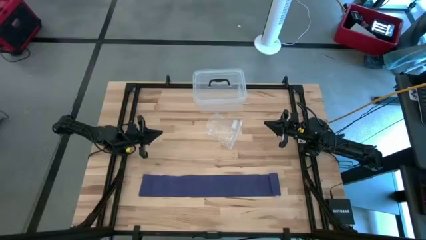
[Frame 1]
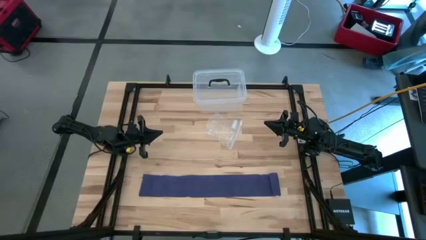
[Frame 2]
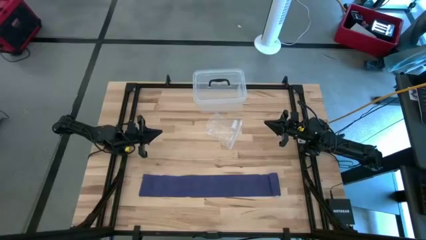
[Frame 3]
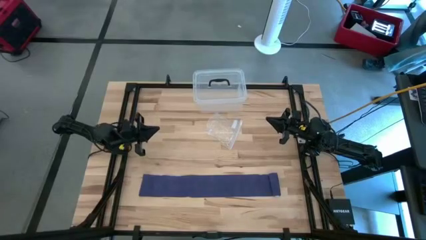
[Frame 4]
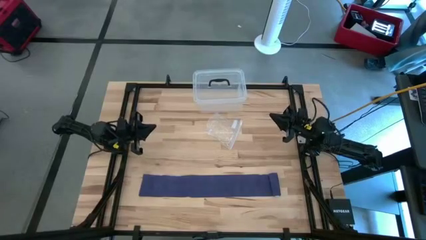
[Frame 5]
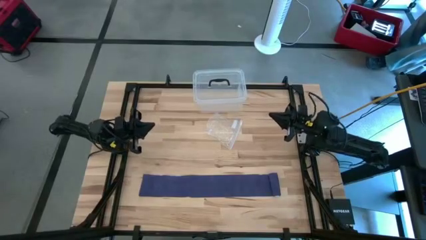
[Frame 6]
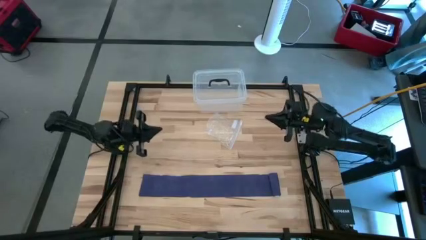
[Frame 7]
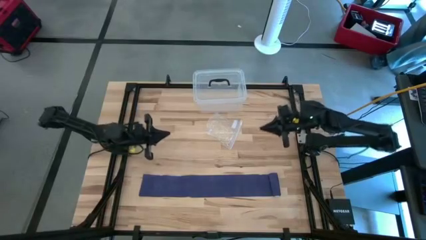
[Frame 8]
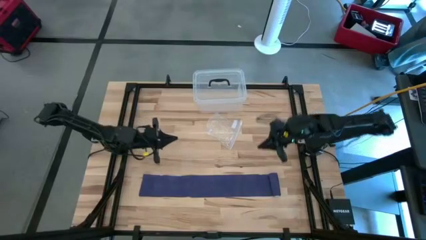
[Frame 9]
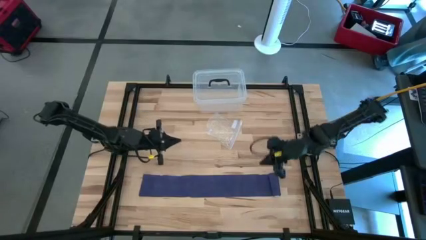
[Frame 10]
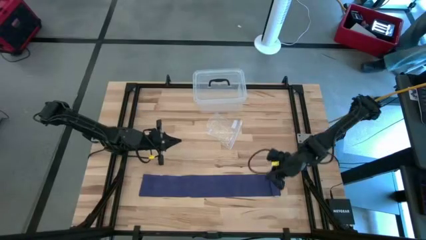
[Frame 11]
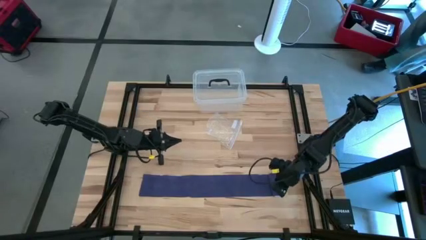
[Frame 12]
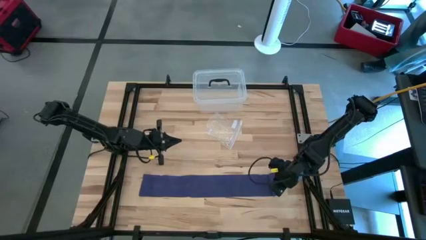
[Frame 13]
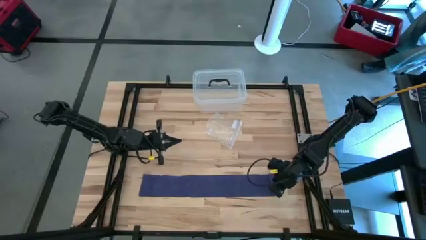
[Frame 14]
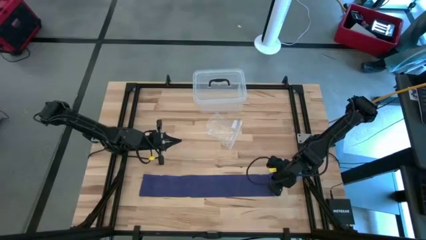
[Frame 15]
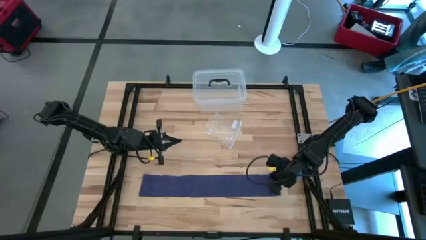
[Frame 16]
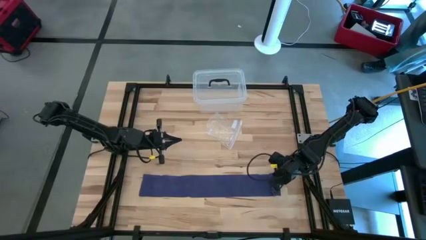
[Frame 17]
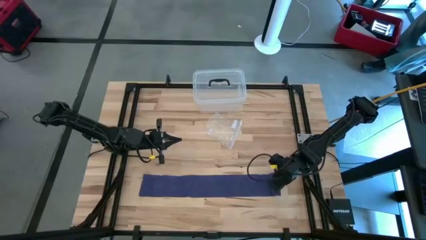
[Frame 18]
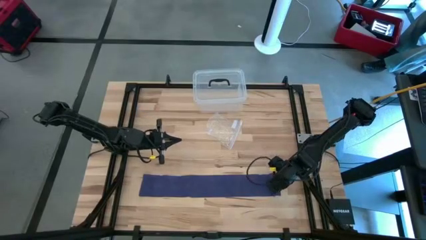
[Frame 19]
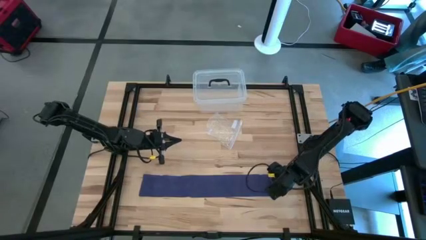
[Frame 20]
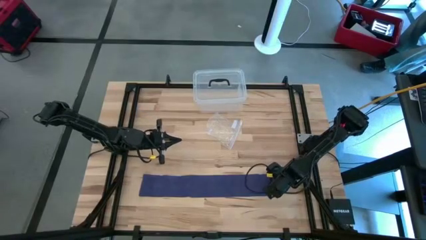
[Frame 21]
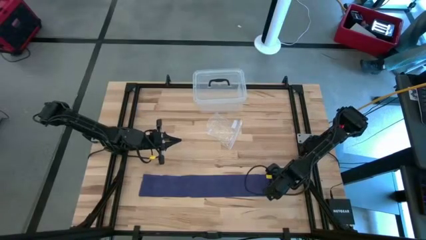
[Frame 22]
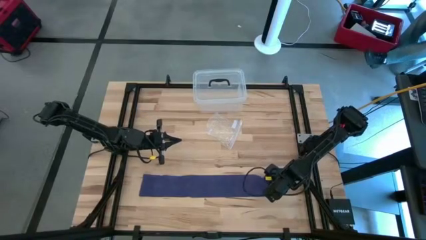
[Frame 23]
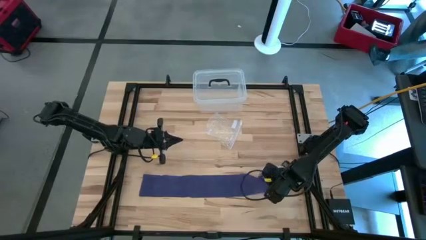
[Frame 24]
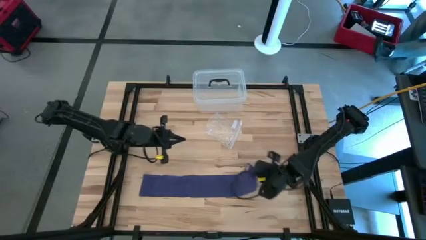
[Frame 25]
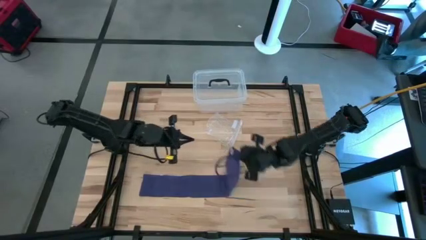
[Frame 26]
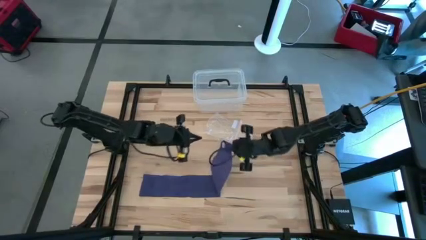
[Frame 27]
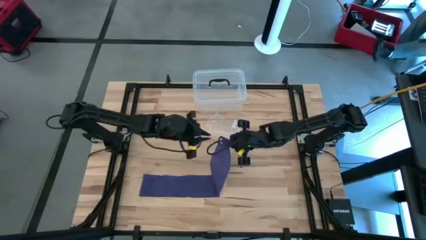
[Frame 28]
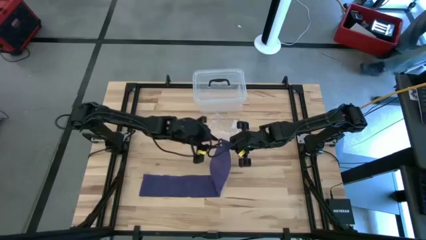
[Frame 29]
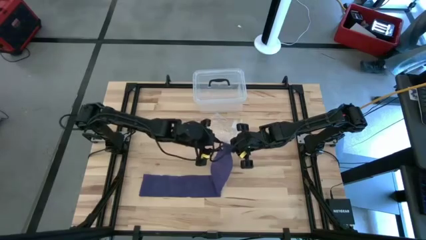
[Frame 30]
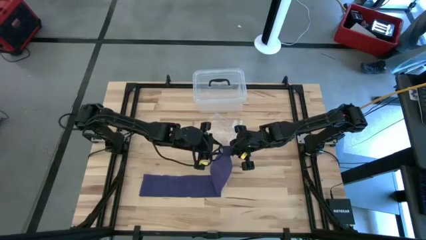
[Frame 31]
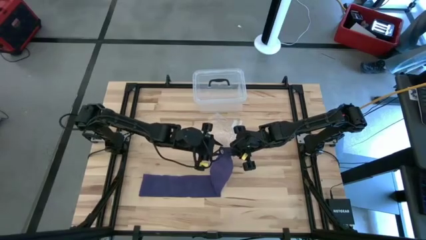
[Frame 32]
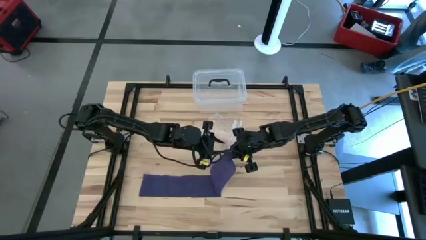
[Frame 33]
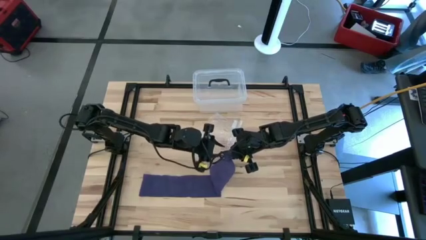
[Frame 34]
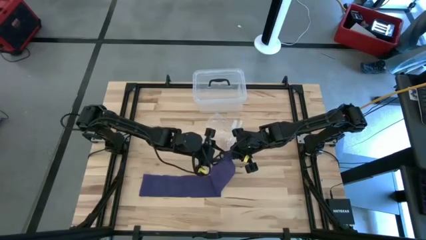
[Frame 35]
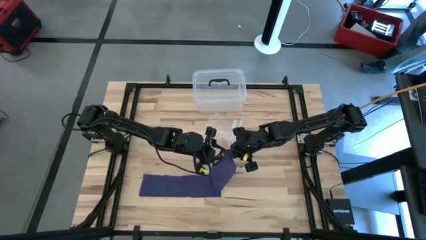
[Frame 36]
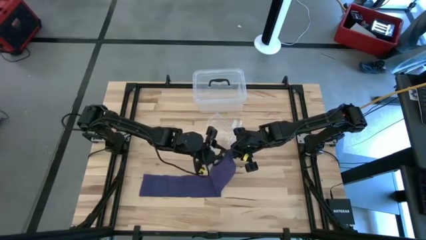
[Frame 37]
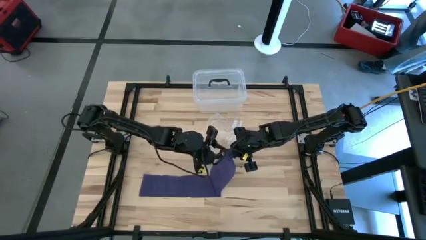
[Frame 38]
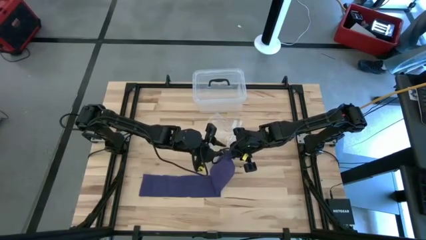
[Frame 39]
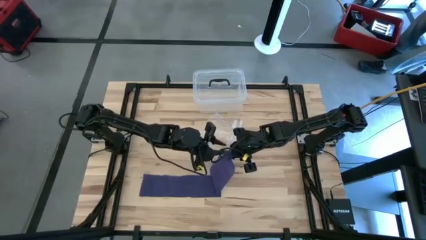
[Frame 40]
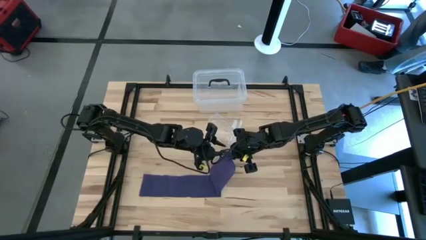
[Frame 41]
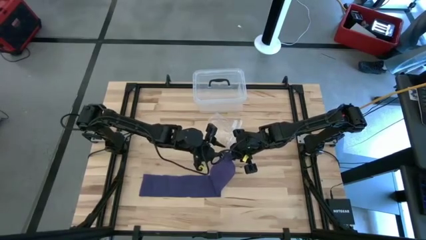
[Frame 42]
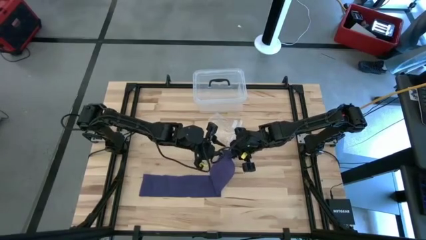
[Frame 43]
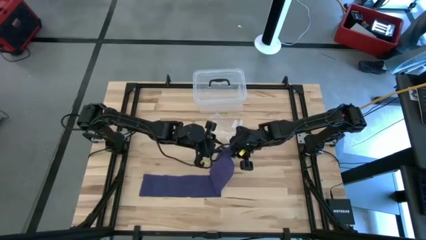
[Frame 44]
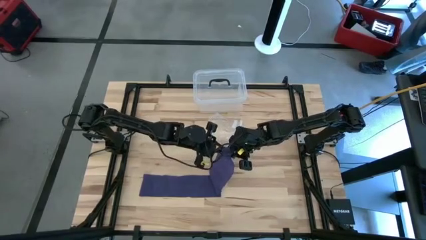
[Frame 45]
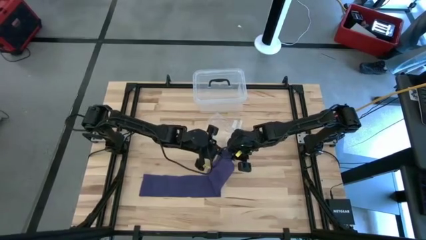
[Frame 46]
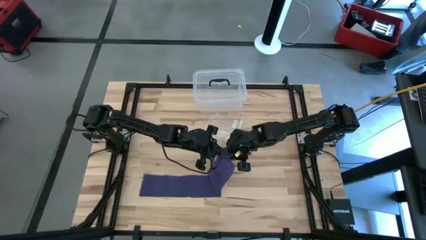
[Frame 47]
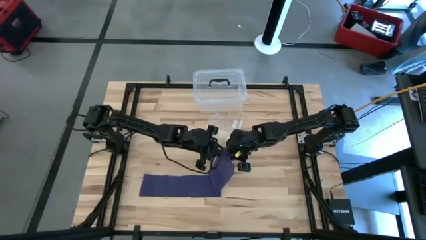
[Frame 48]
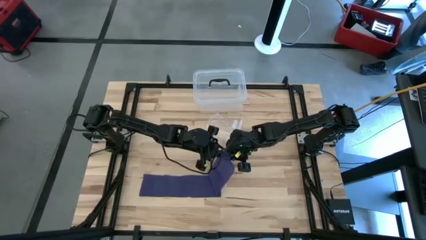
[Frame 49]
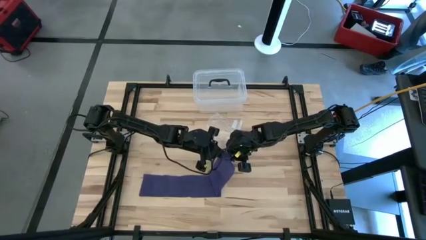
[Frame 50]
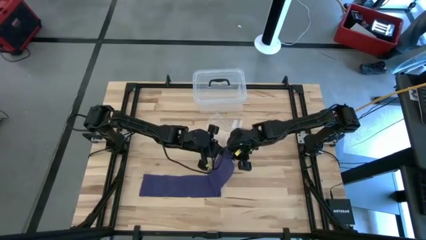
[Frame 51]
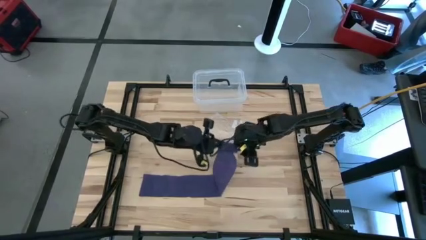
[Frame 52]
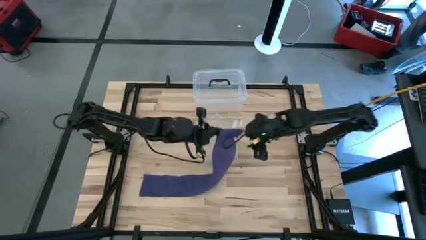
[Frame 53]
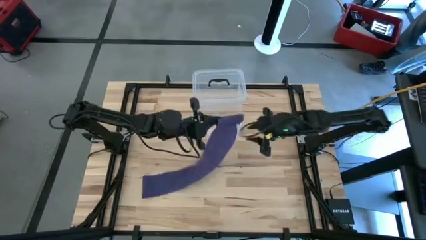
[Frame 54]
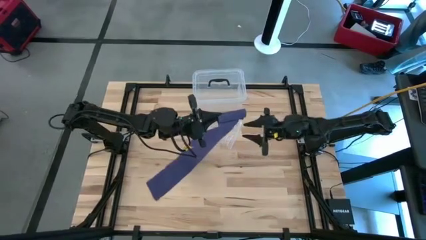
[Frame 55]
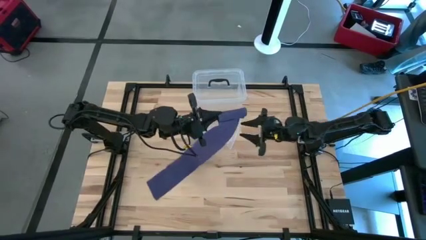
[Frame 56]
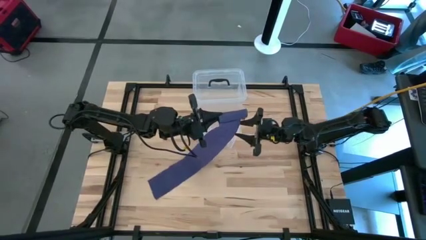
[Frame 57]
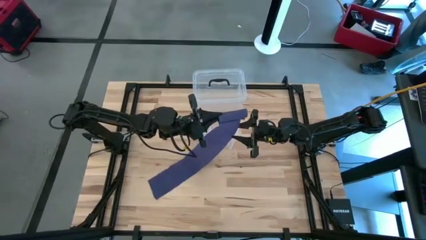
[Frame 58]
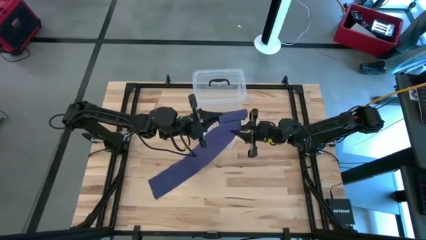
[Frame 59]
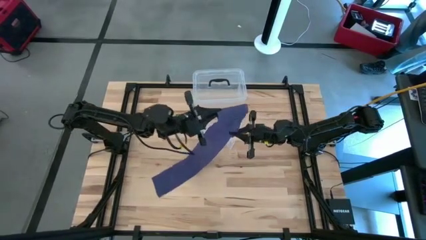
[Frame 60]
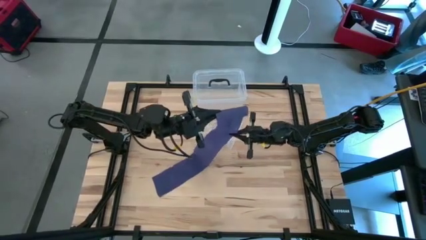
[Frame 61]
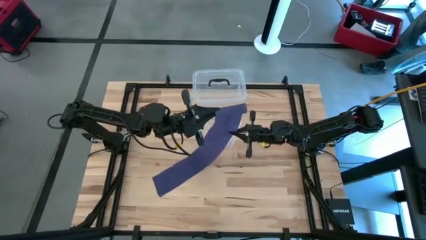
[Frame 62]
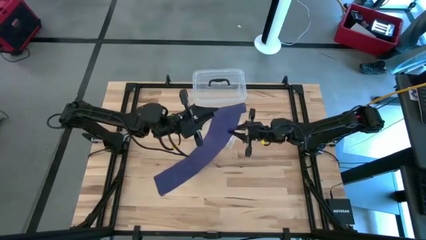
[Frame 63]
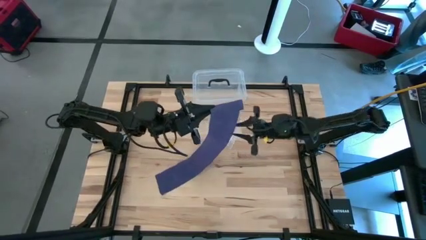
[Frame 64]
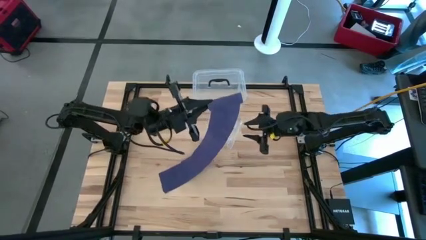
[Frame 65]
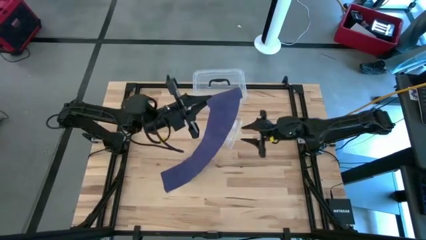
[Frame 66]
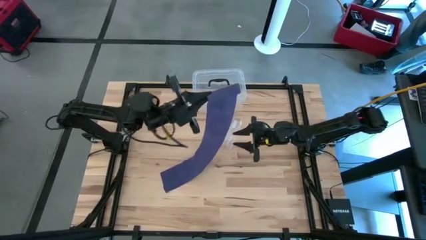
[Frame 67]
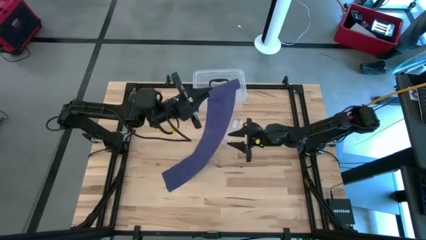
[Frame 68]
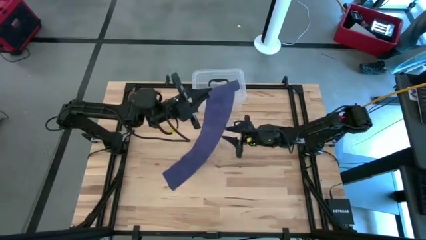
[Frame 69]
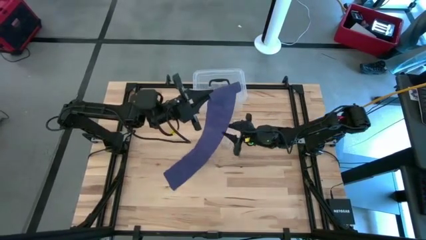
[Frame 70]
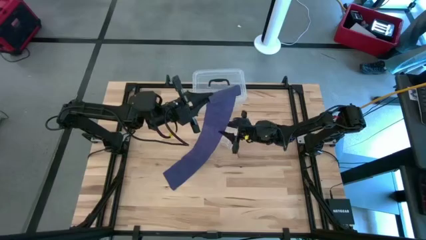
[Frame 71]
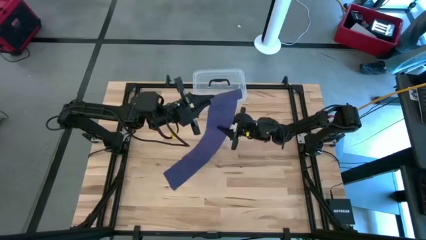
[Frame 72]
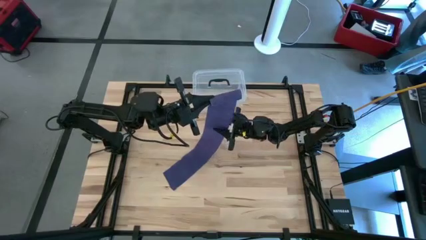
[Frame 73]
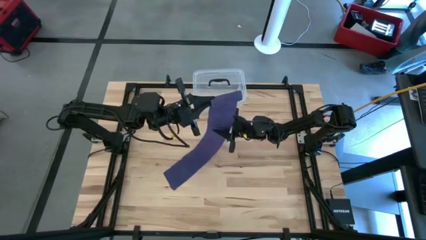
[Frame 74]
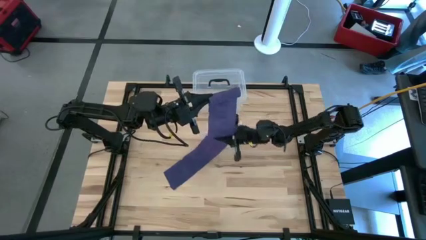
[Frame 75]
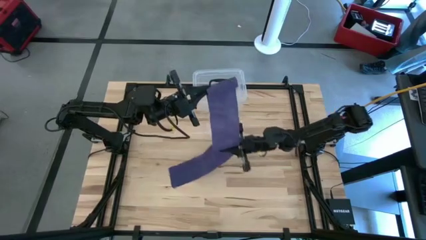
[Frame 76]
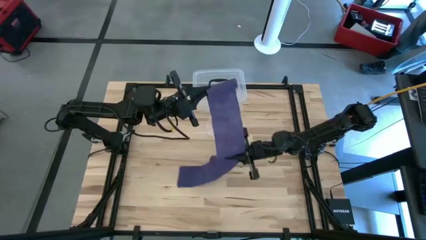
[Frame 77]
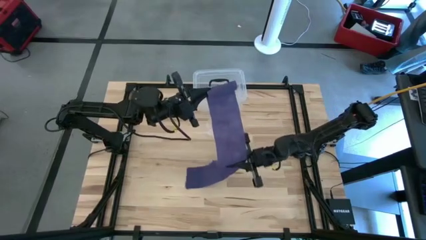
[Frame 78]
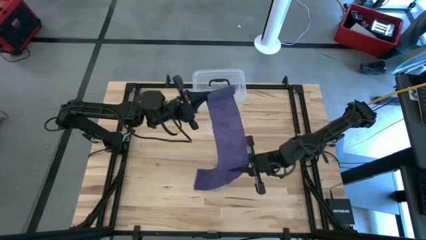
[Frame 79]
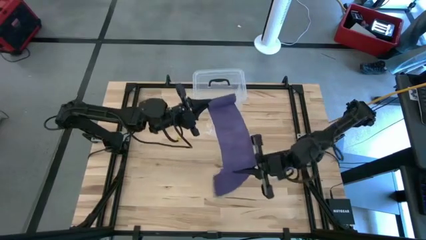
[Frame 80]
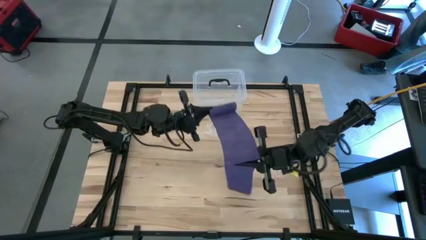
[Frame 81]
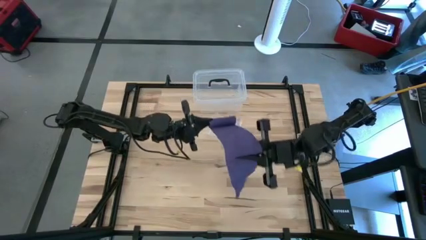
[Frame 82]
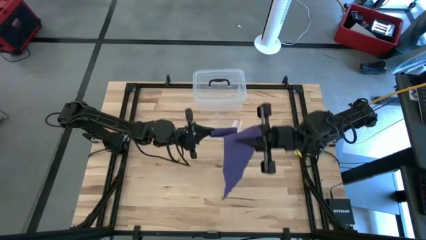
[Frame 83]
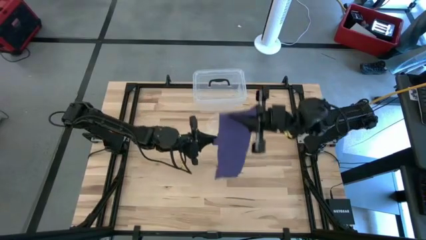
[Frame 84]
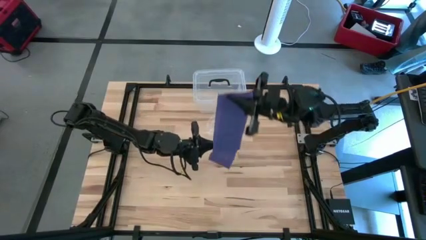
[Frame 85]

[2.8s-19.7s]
Task: Roll bandage
Roll the violet bandage
